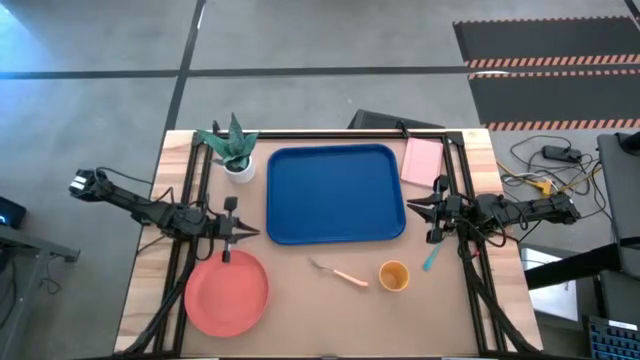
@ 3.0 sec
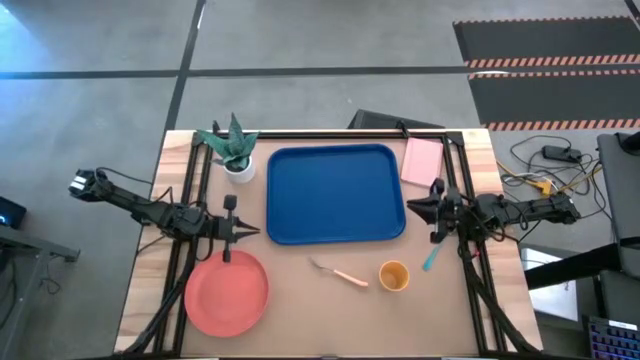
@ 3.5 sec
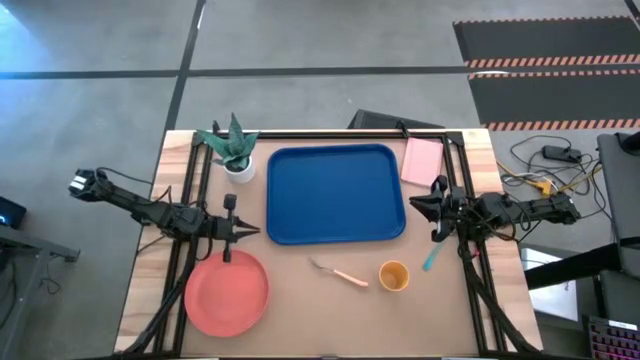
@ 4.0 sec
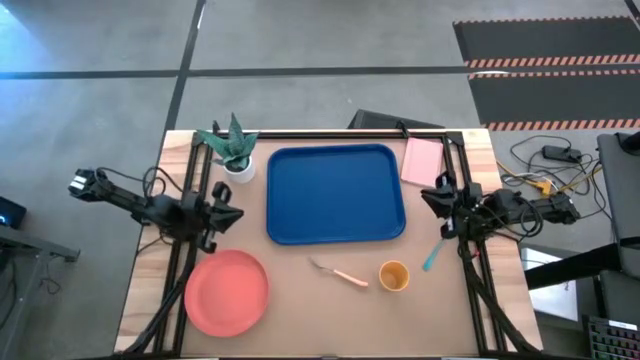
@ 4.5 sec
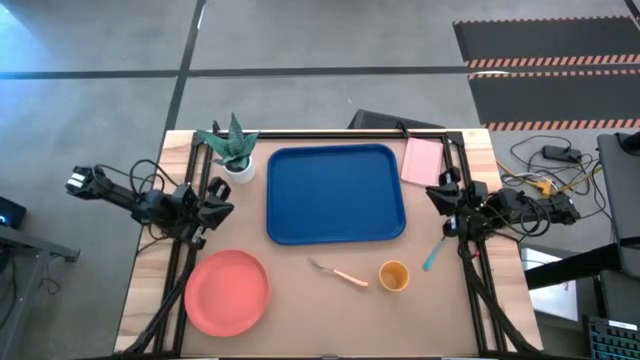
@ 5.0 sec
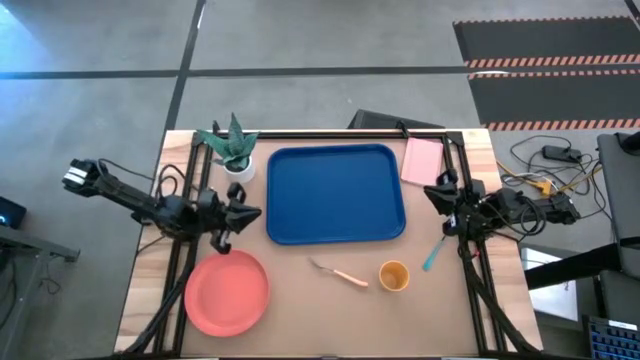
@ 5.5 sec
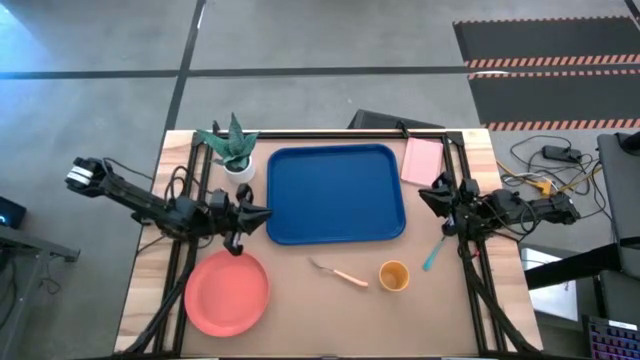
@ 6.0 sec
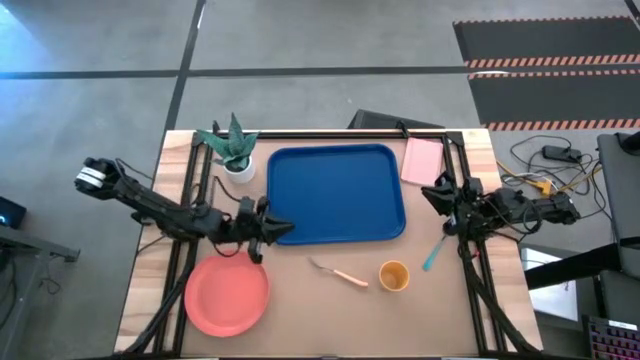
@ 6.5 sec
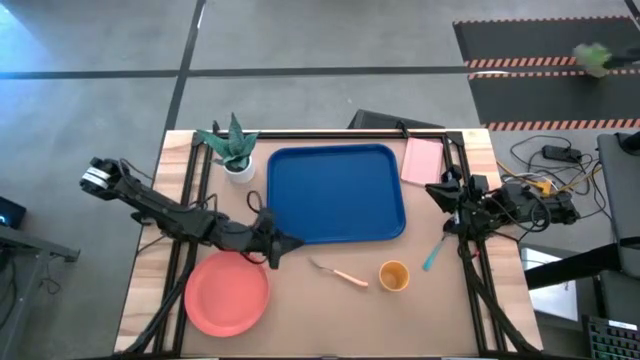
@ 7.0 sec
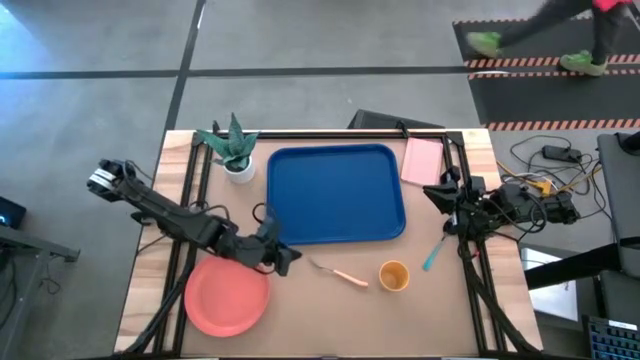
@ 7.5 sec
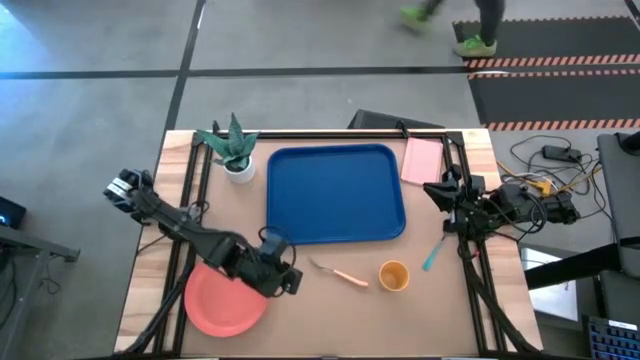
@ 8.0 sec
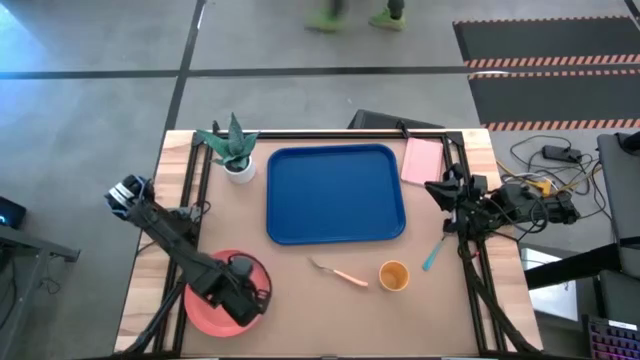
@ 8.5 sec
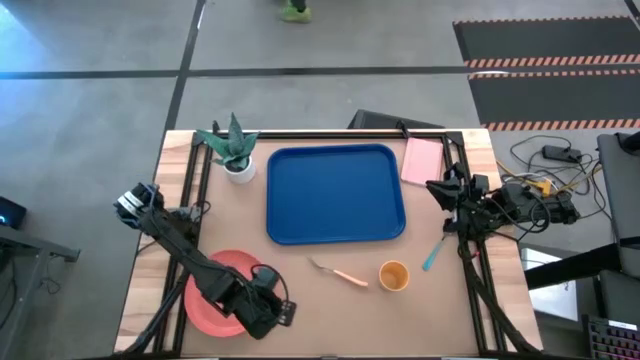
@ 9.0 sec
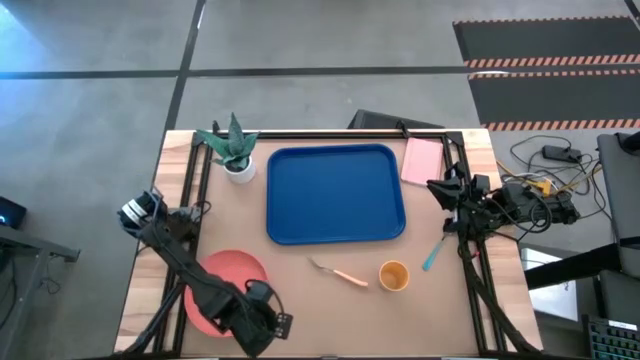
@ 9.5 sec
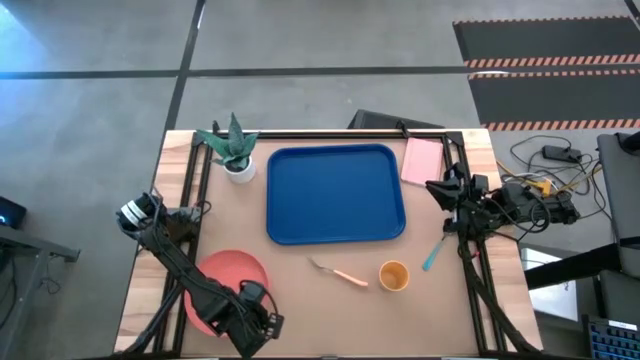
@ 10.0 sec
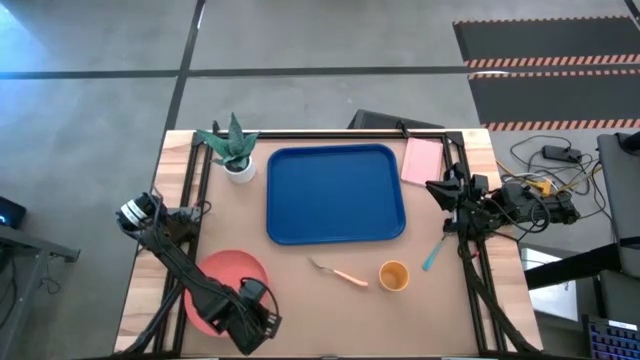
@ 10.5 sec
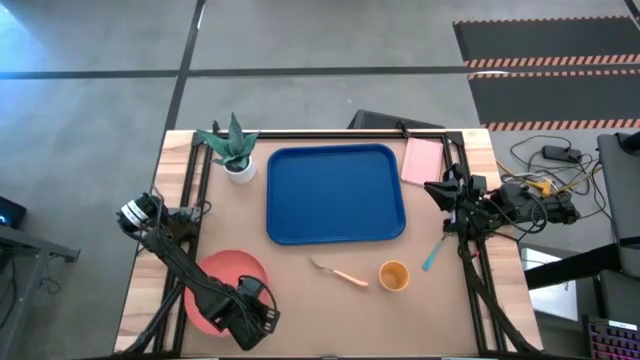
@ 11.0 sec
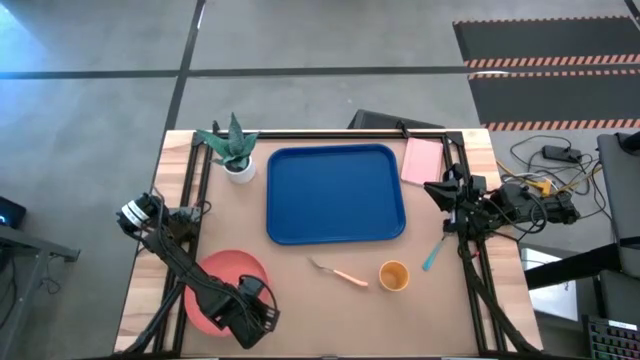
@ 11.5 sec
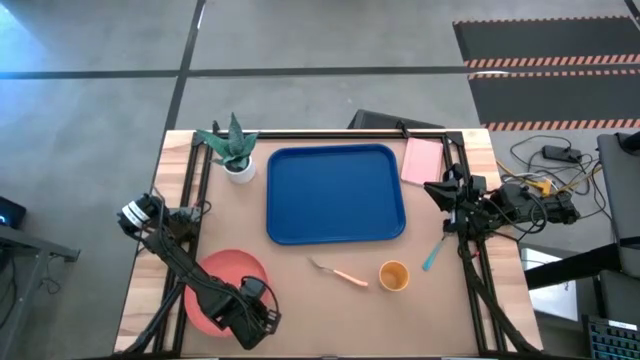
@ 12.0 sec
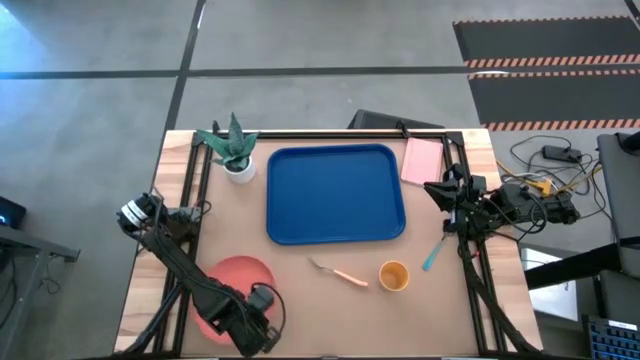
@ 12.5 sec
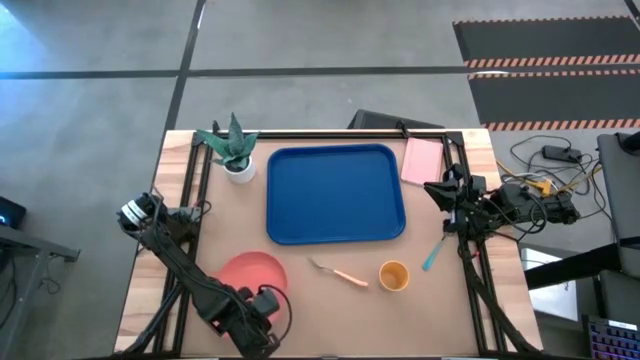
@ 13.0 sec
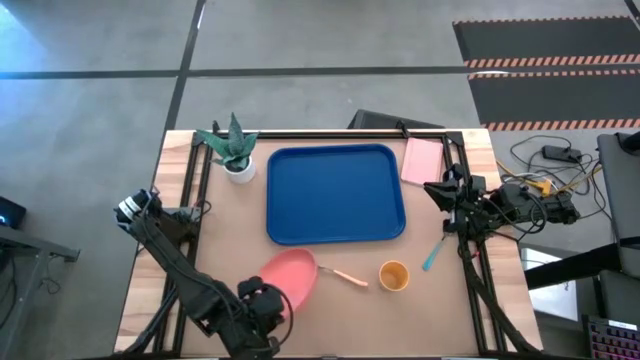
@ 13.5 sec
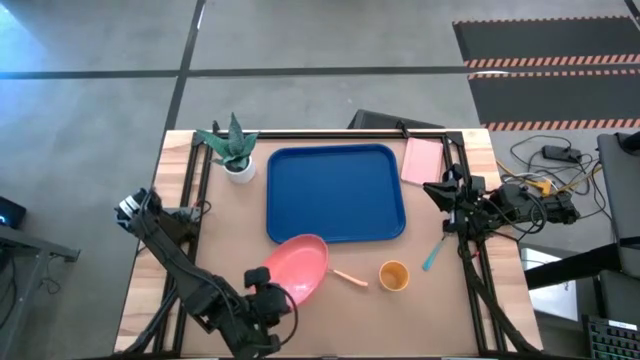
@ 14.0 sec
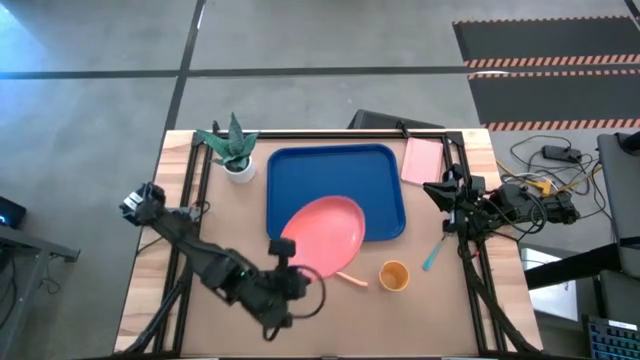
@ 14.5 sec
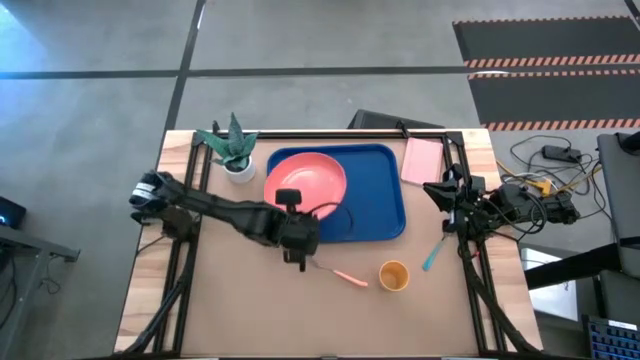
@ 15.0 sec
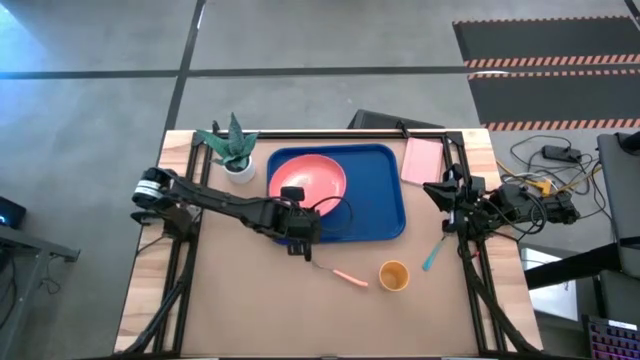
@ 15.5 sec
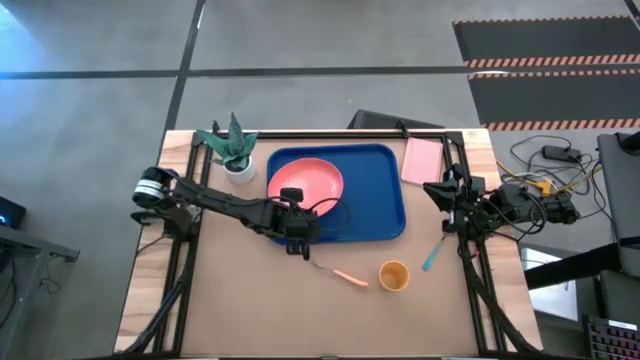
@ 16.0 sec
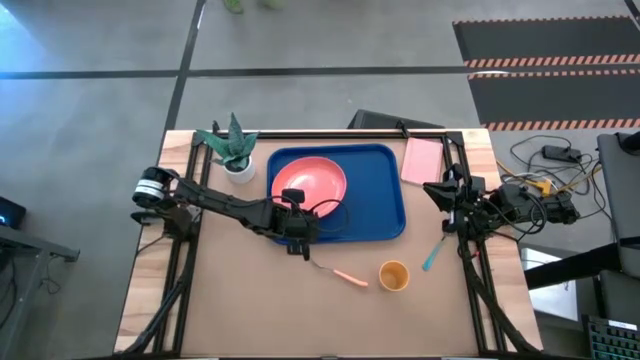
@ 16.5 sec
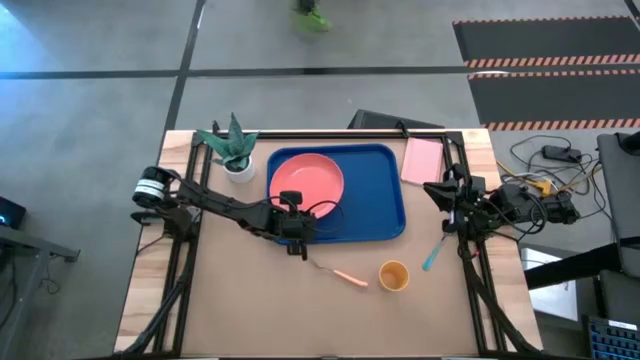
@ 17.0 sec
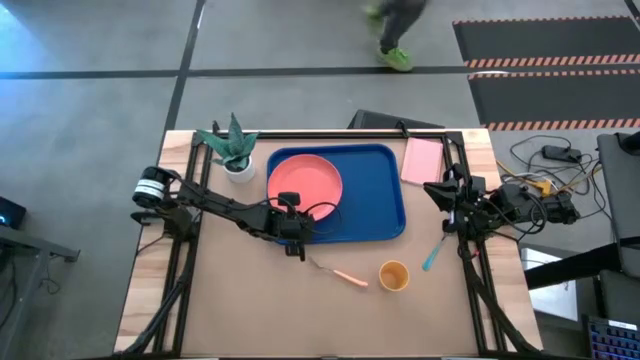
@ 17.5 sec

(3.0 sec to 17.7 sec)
Task: Pick and place plate/cup/fork/spoon on tray
Put the orange plate on the blue tray

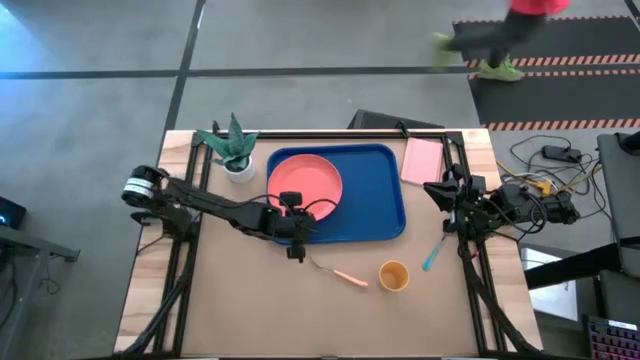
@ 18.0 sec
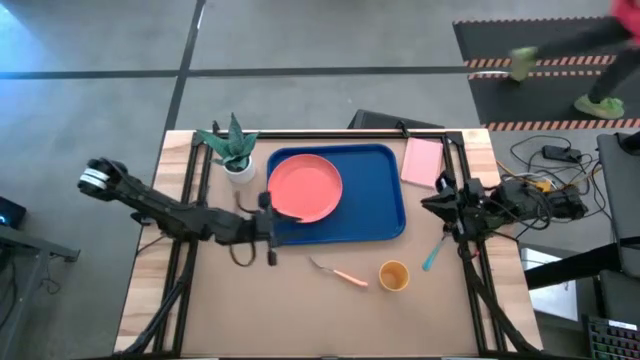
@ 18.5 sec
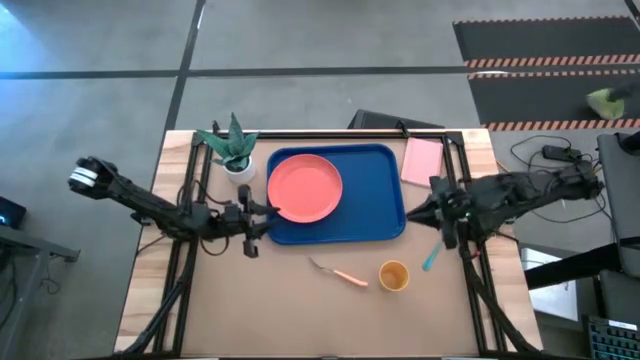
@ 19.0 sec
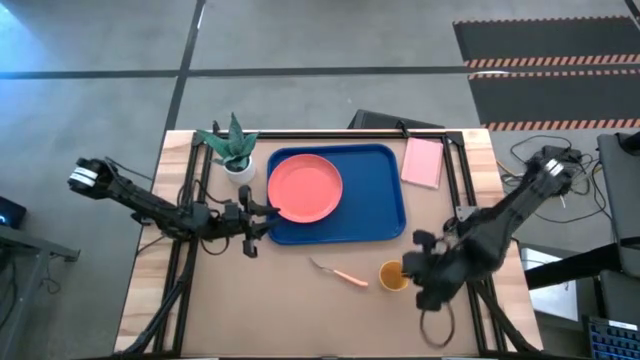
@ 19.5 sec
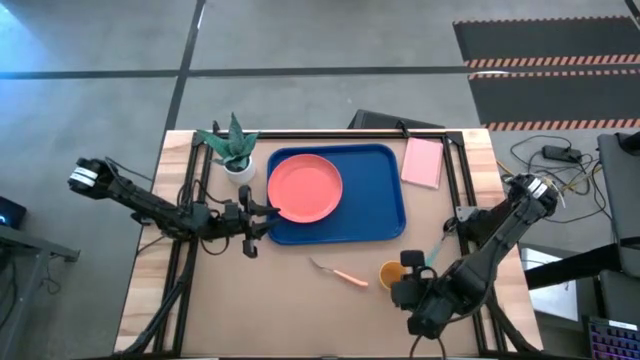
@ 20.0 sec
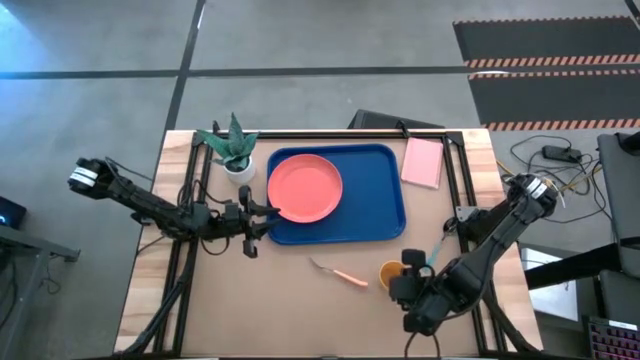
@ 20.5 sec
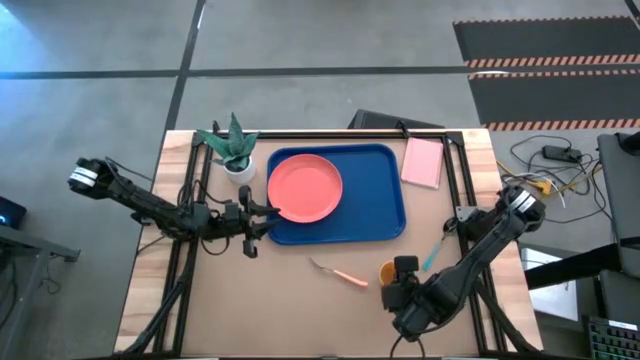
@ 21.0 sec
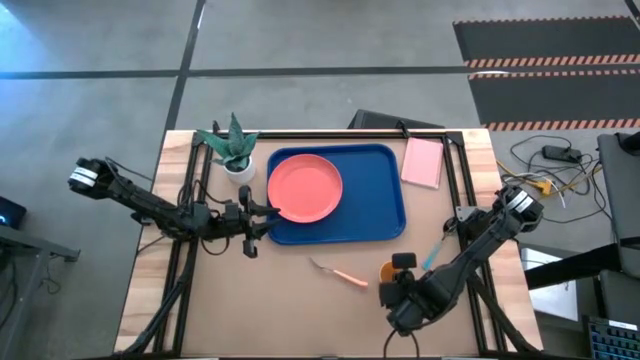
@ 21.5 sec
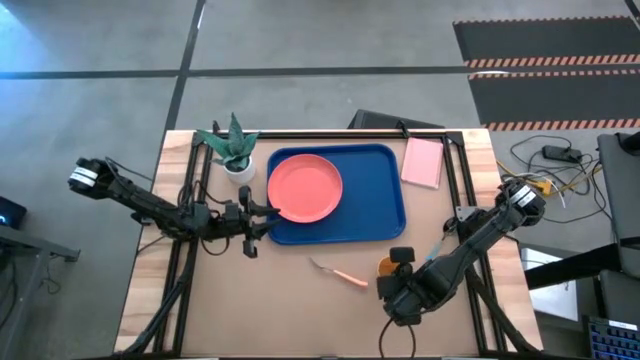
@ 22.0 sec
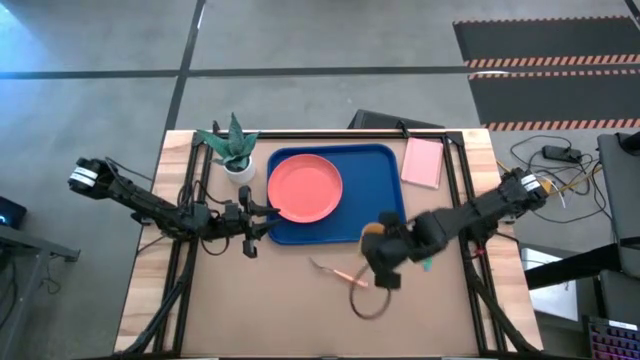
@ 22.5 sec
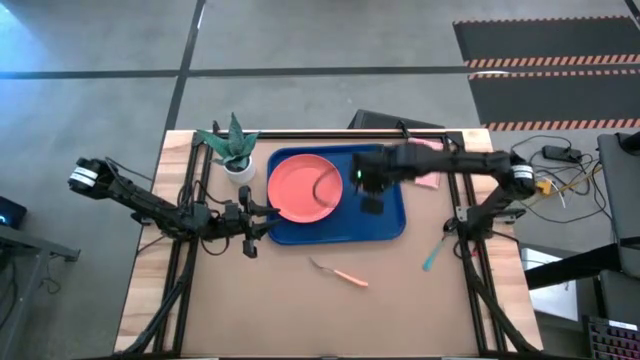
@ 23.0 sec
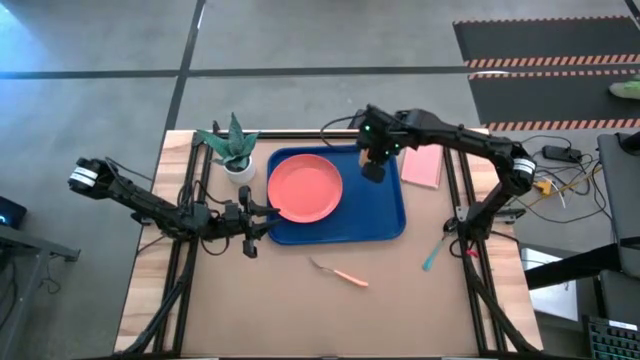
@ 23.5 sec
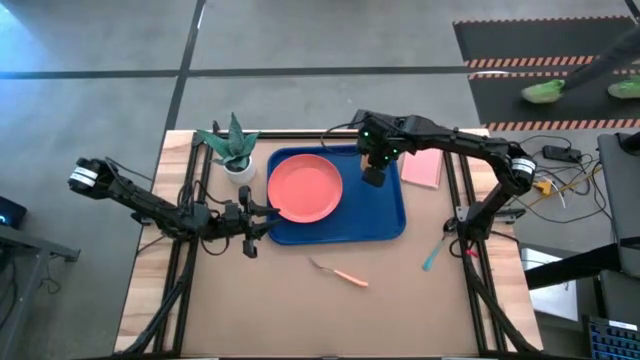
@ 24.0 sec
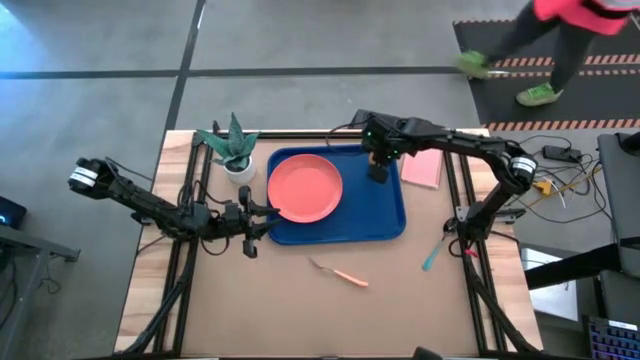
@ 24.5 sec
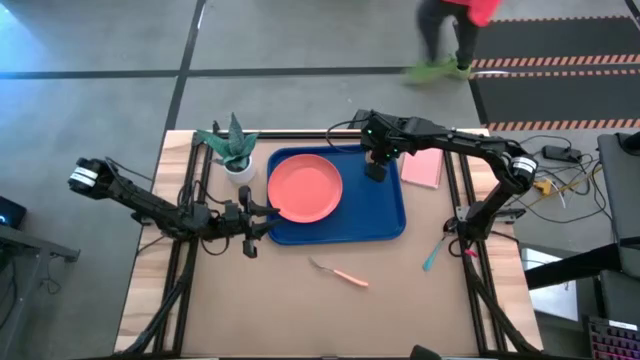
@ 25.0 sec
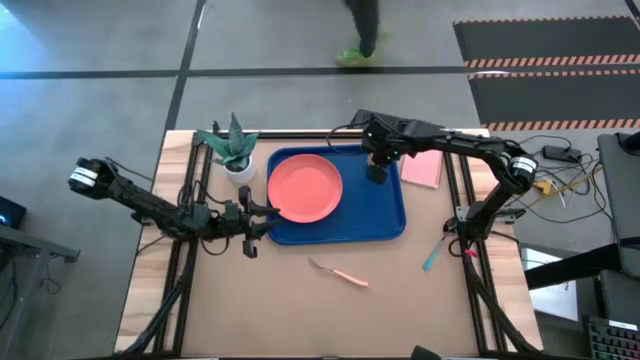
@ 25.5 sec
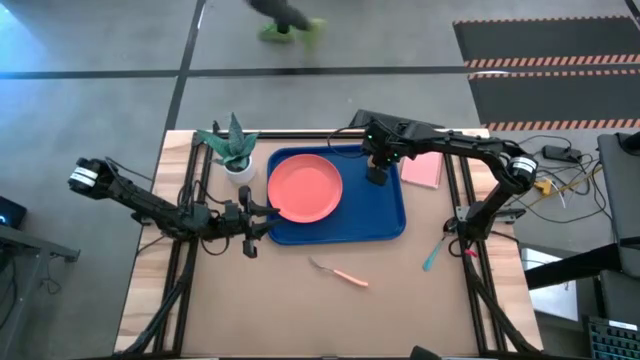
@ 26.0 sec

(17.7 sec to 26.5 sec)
Put the yellow cup on the blue tray on the top right of the orange plate
